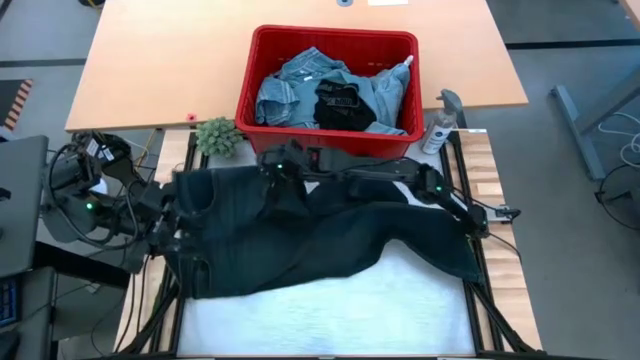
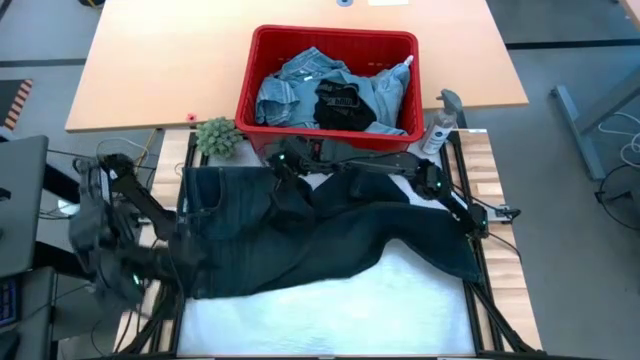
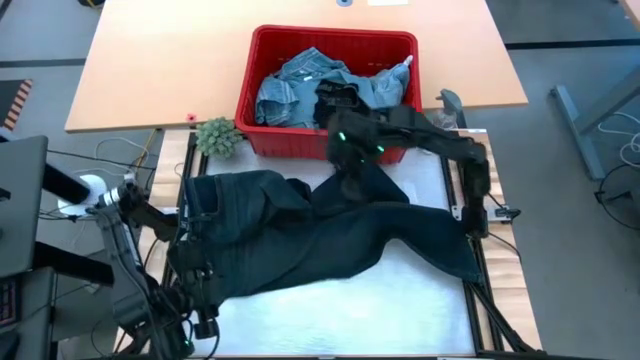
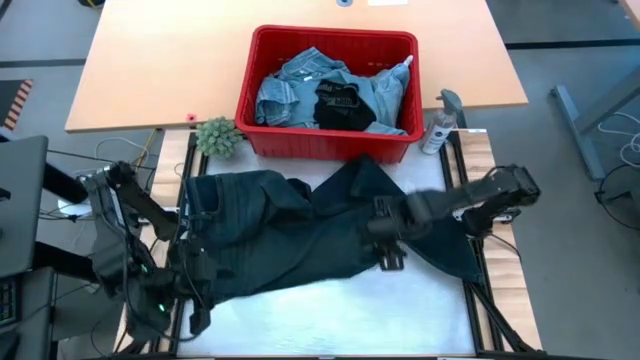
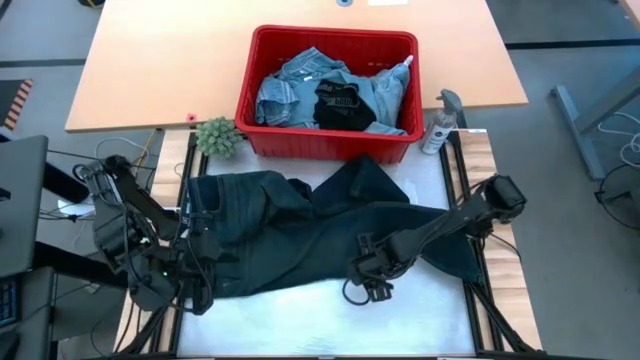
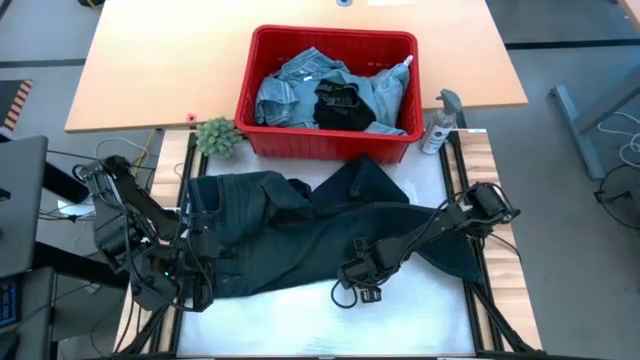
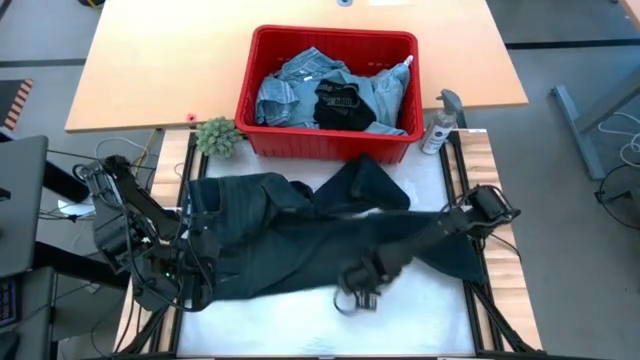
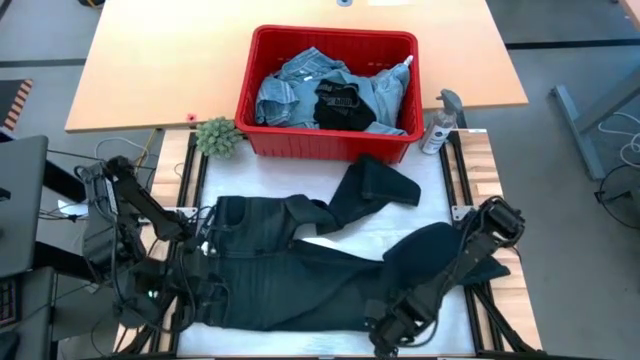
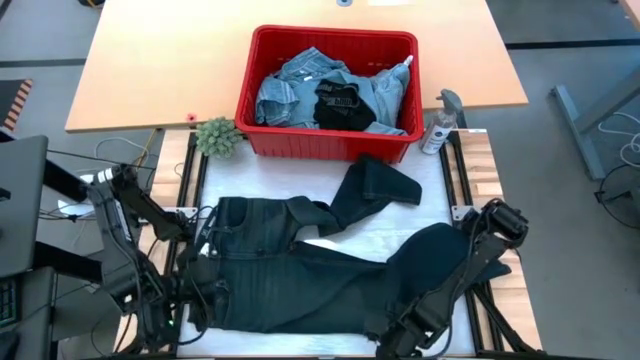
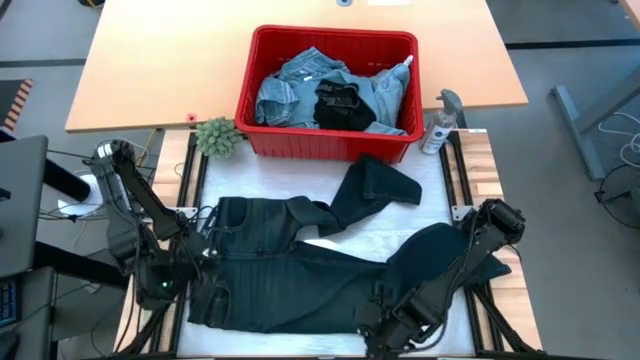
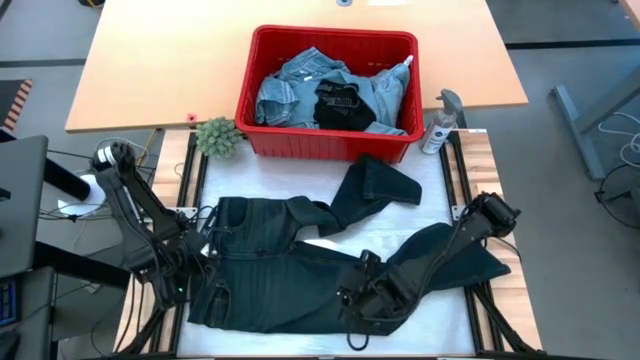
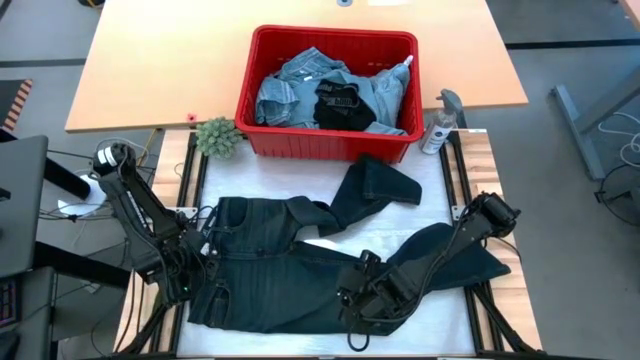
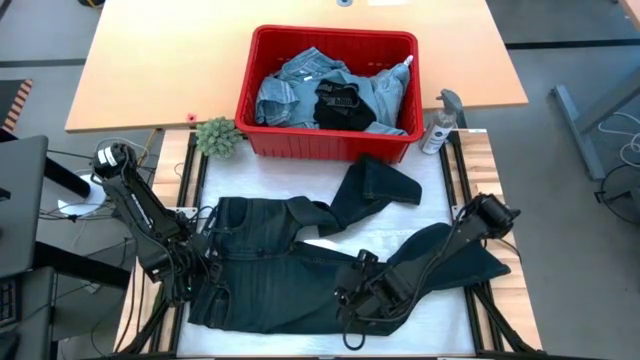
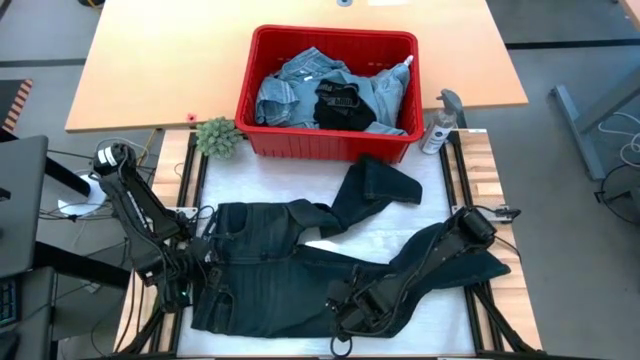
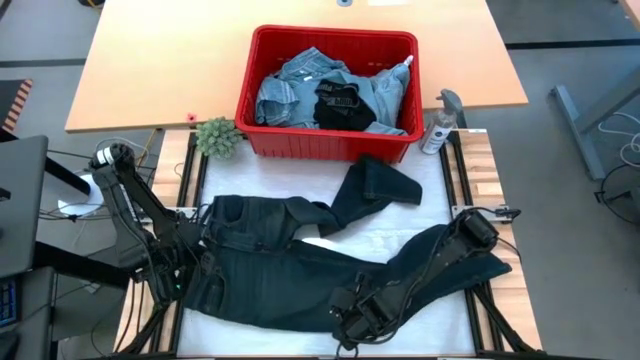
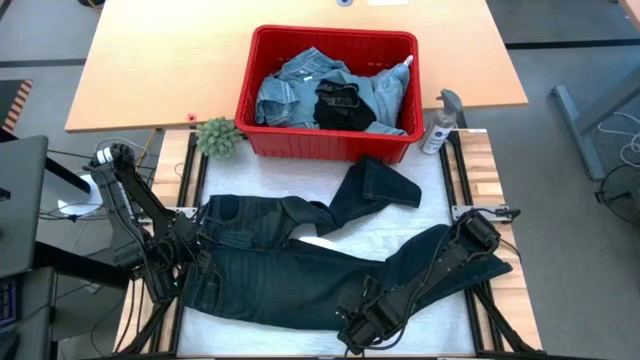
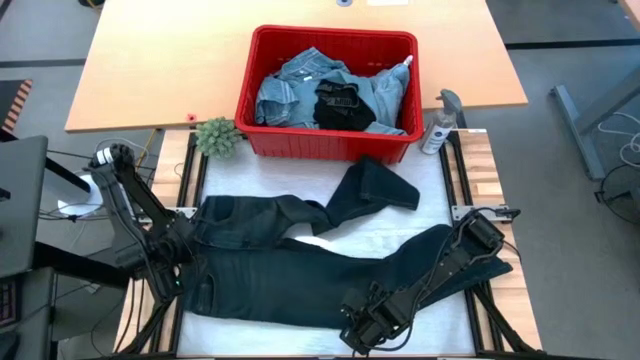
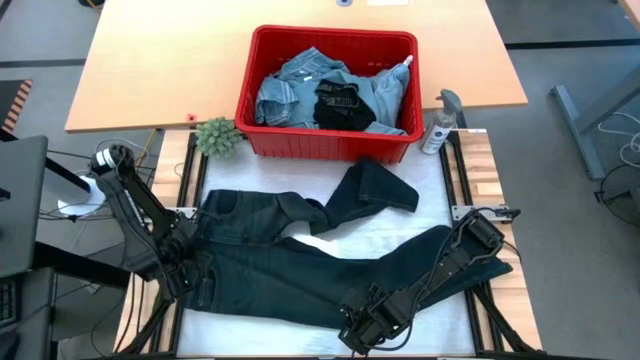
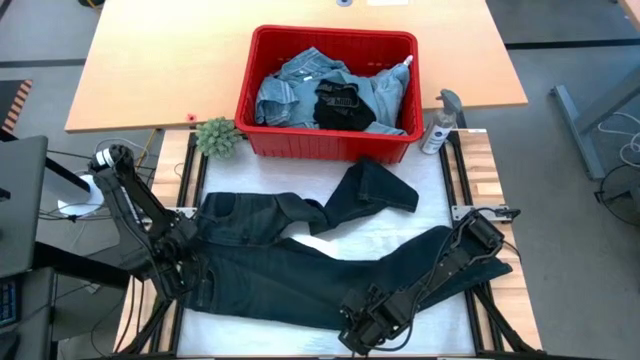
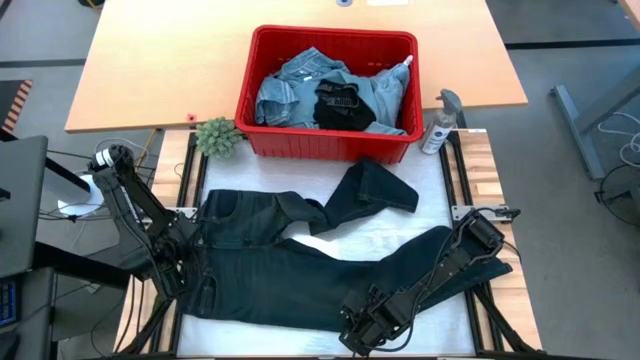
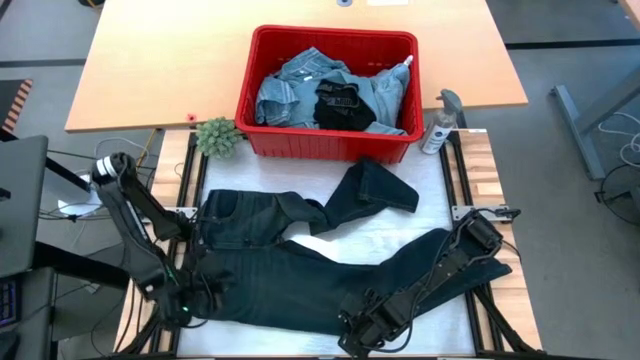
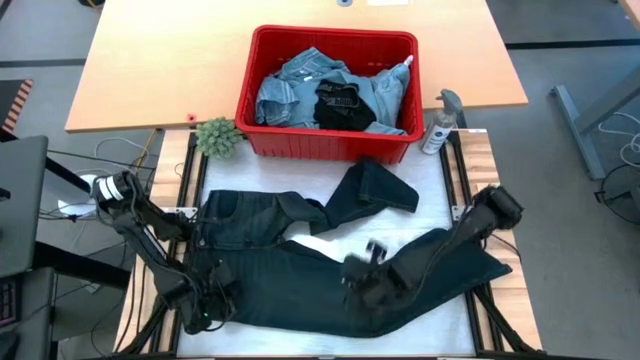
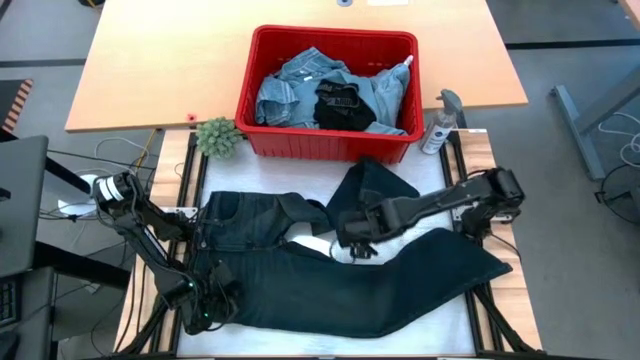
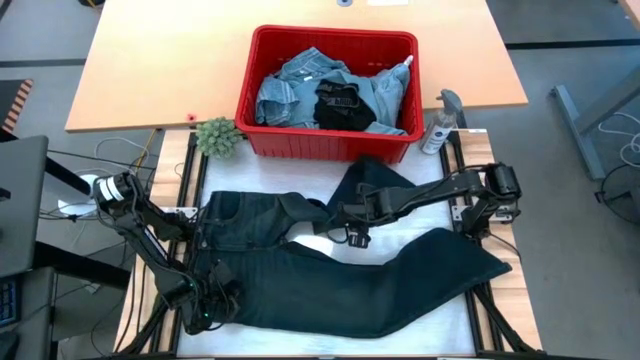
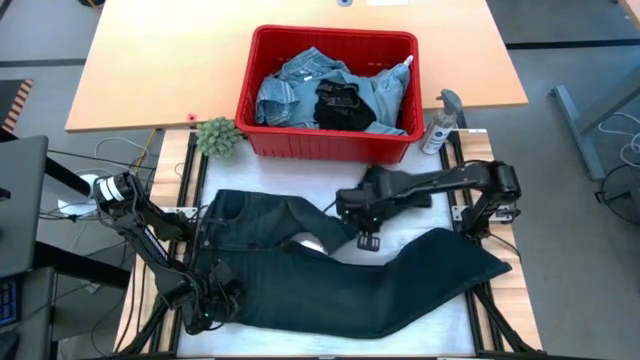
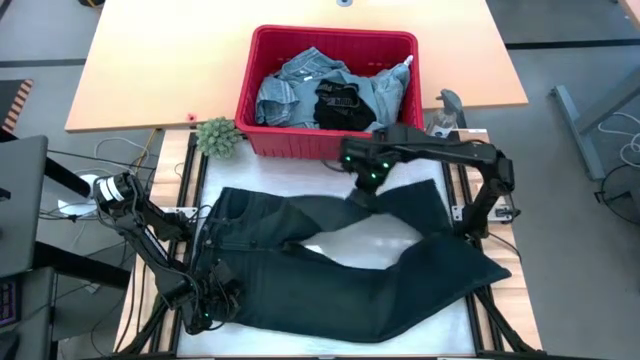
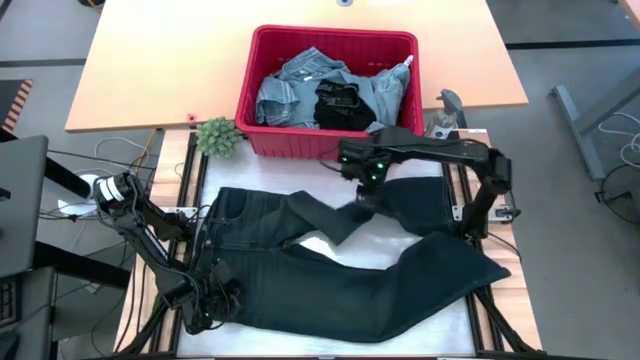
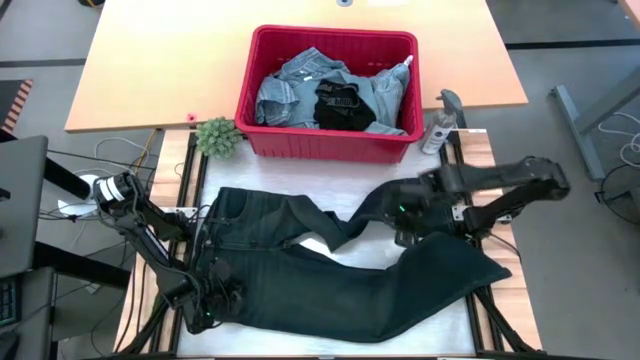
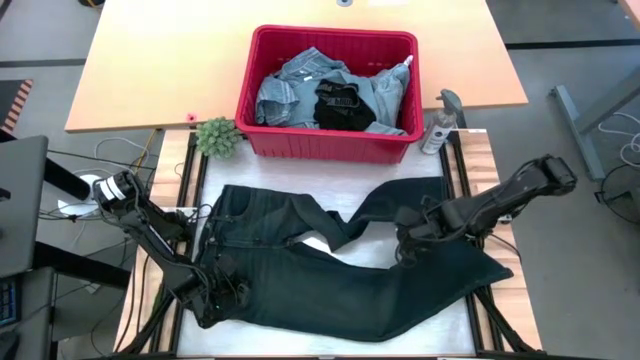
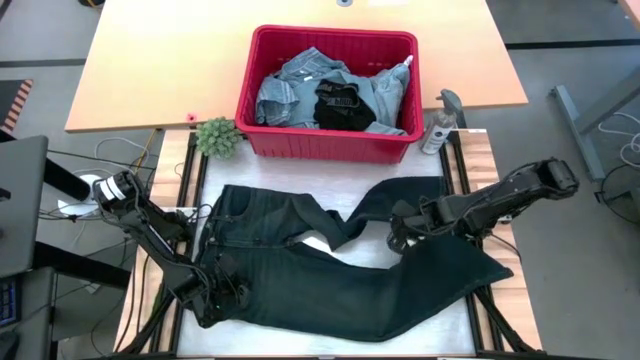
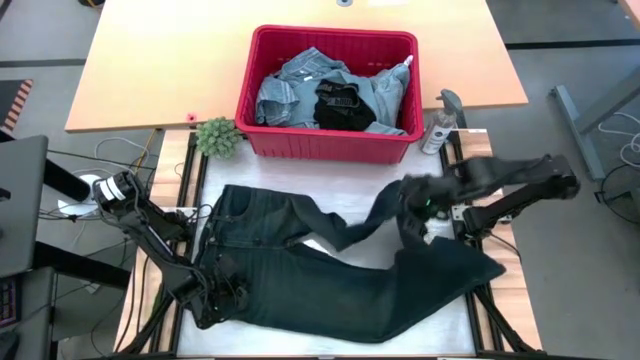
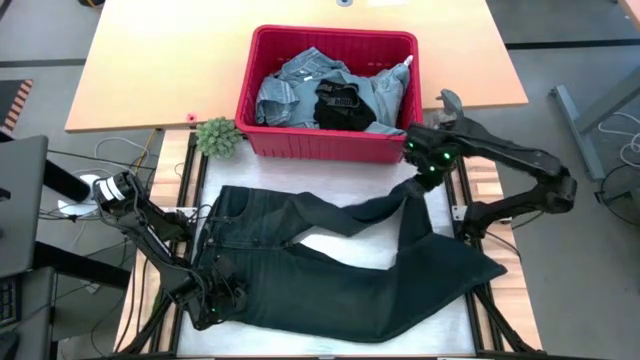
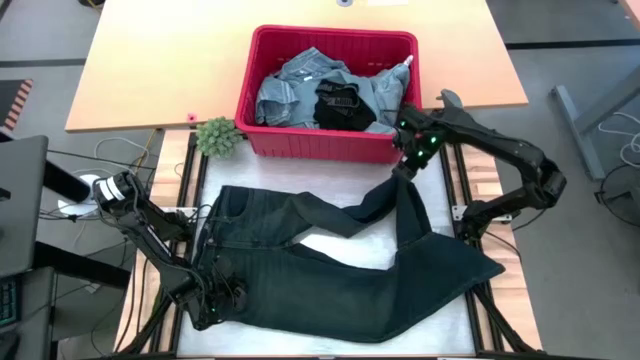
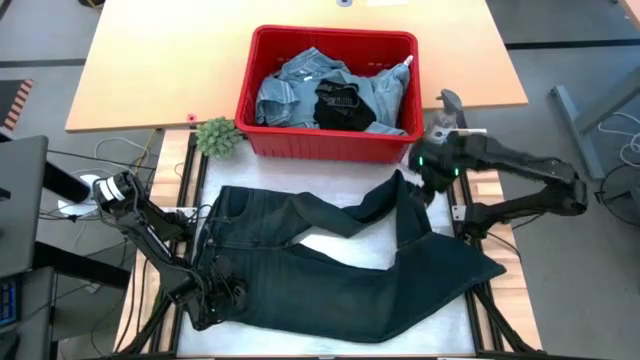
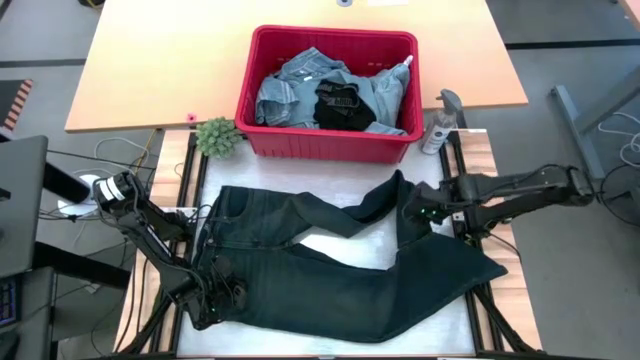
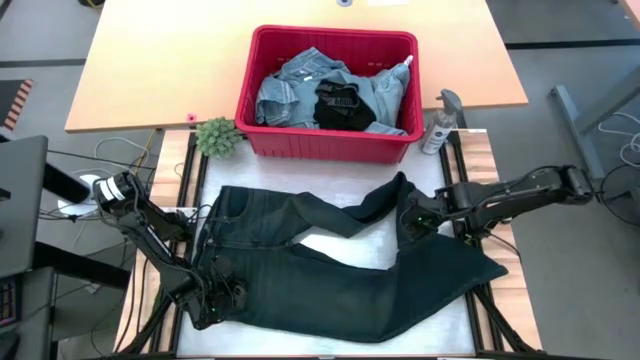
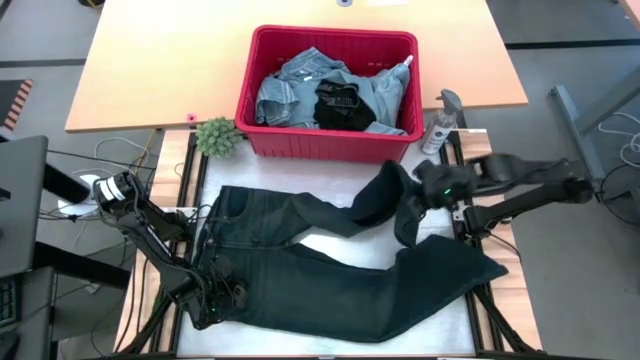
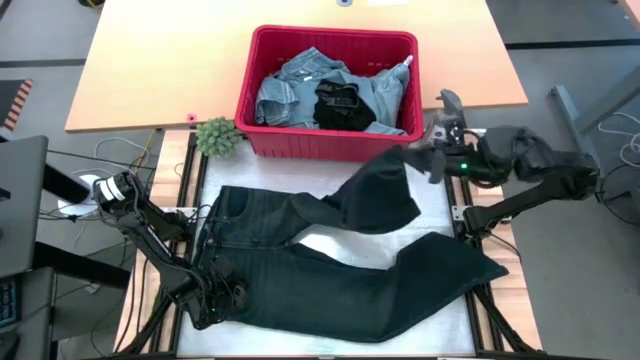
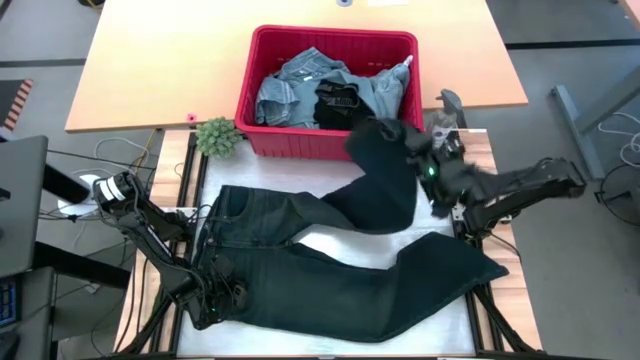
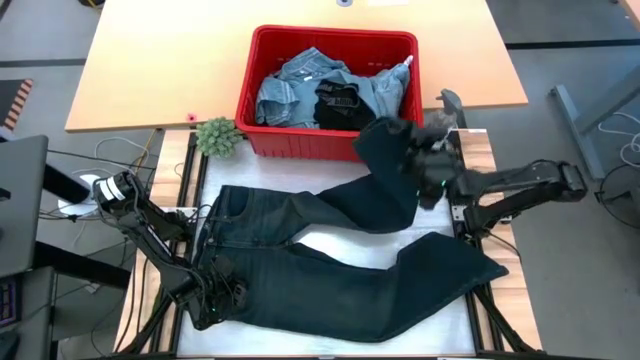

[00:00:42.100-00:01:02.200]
Task: Fold Laundry from Bin
Fold the black pants
